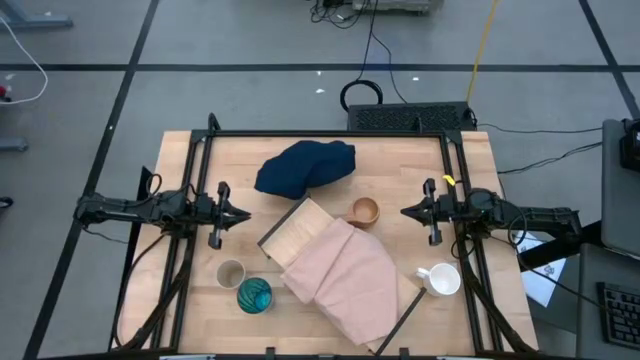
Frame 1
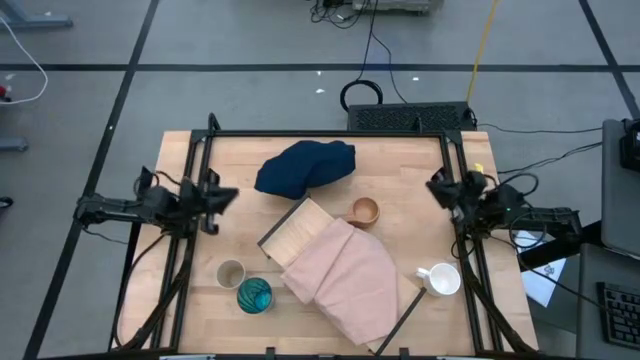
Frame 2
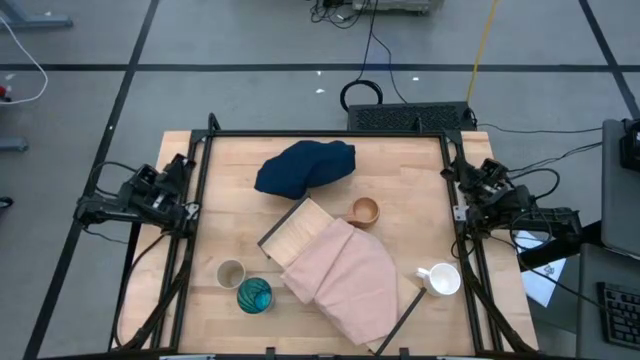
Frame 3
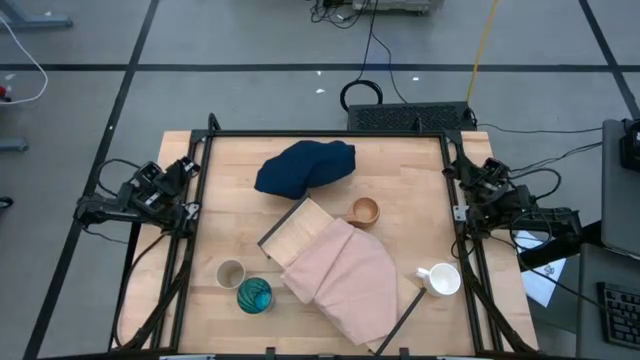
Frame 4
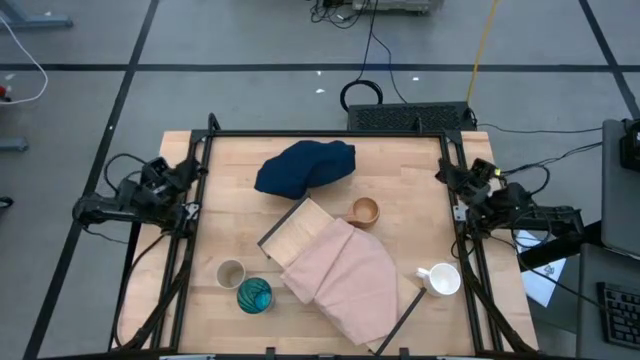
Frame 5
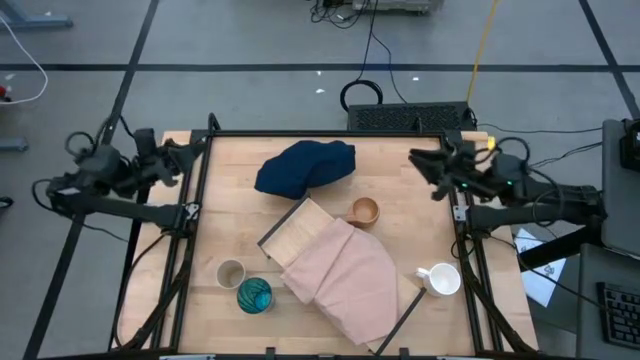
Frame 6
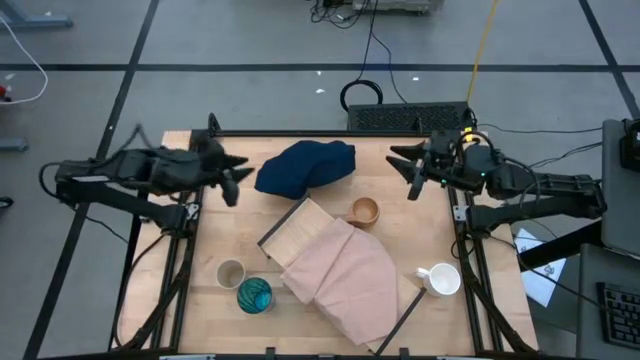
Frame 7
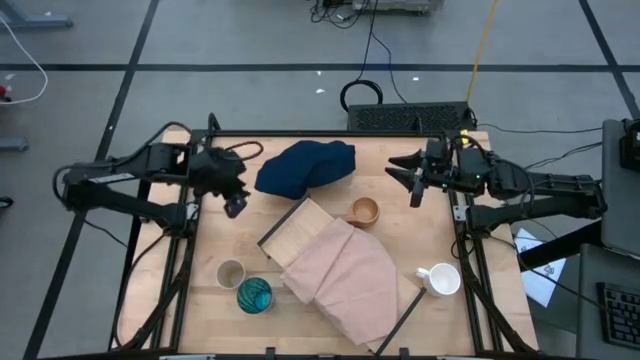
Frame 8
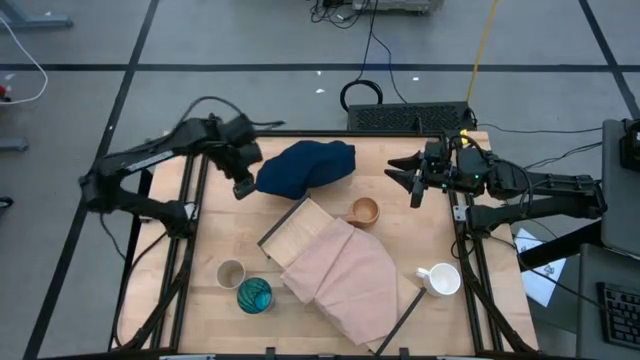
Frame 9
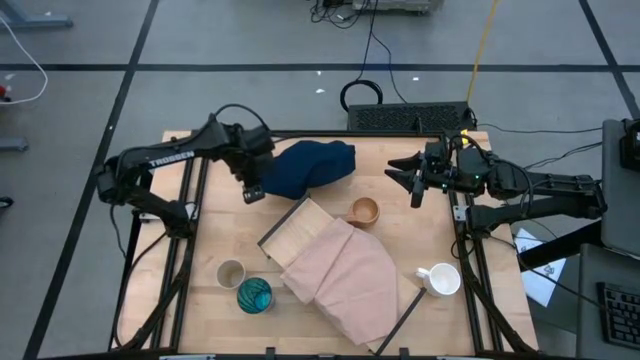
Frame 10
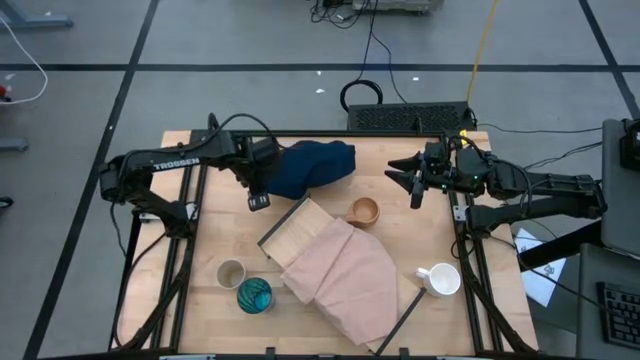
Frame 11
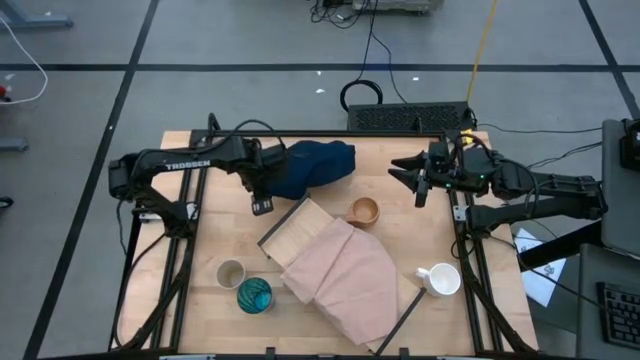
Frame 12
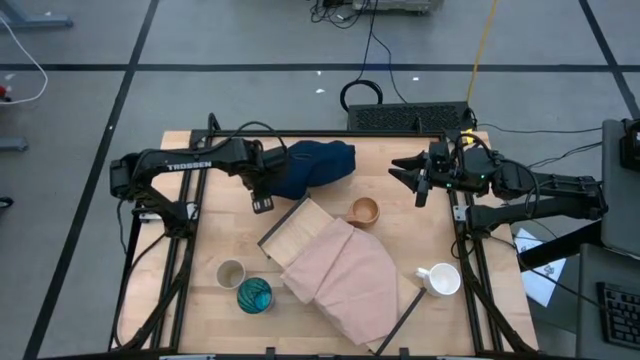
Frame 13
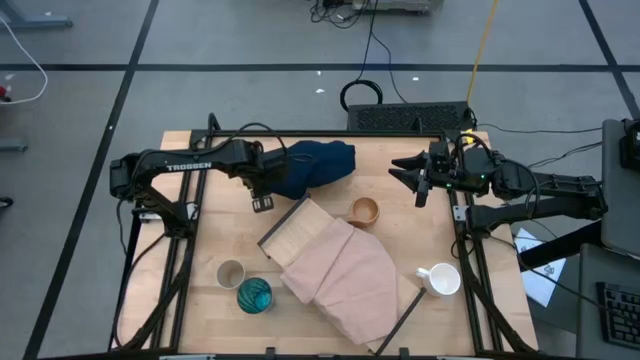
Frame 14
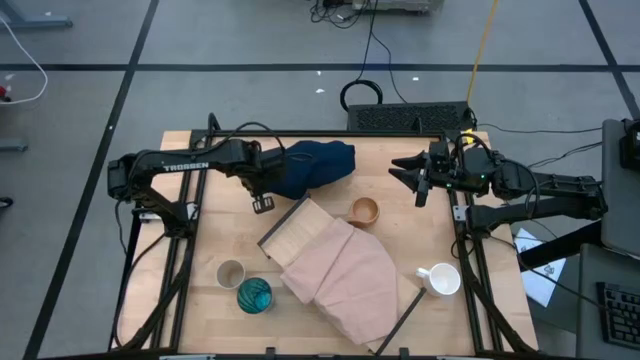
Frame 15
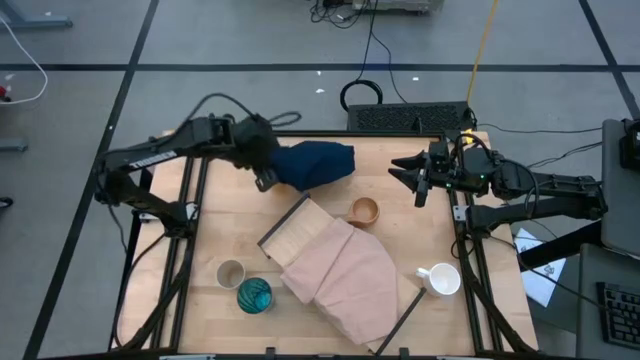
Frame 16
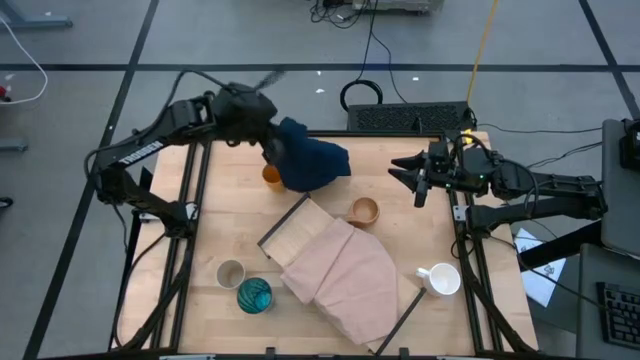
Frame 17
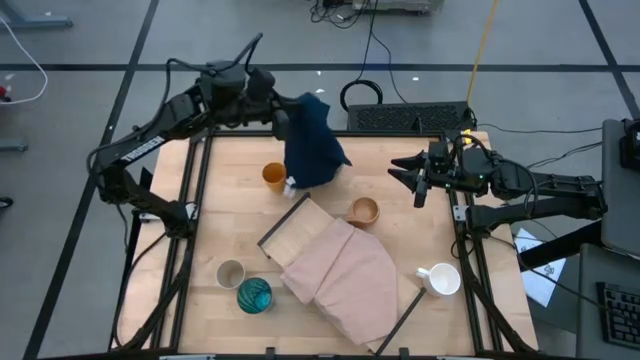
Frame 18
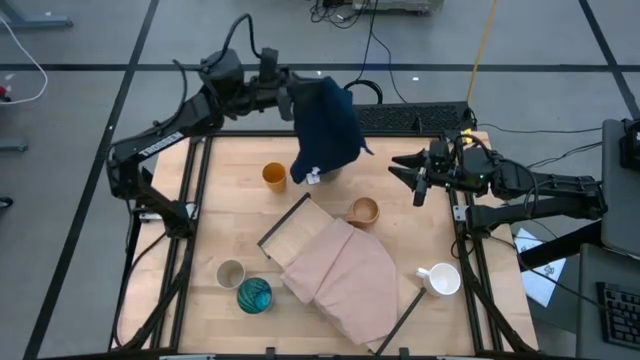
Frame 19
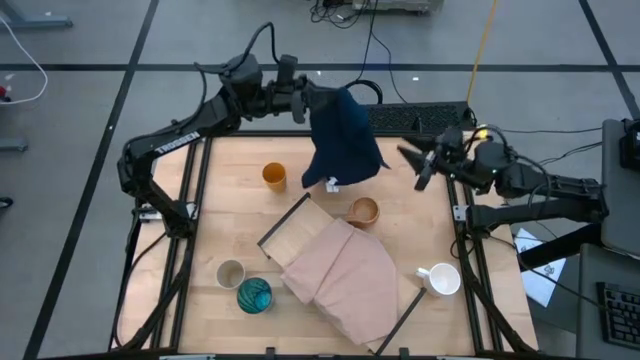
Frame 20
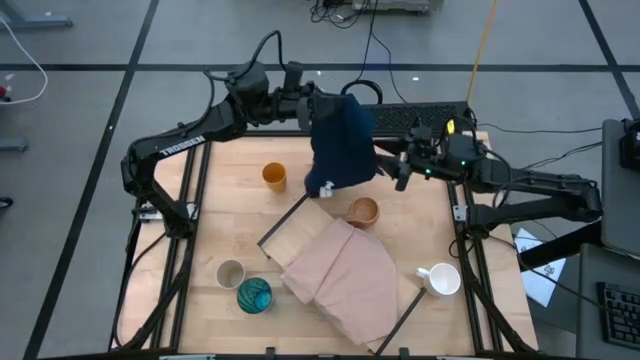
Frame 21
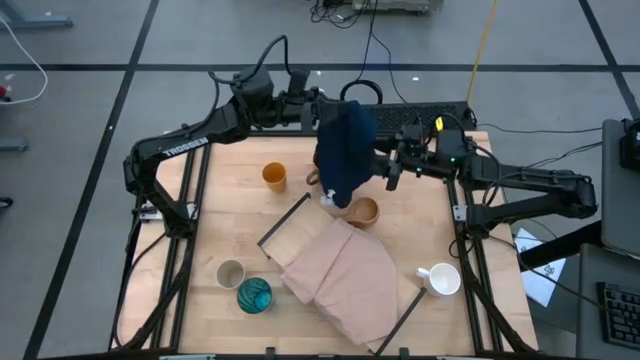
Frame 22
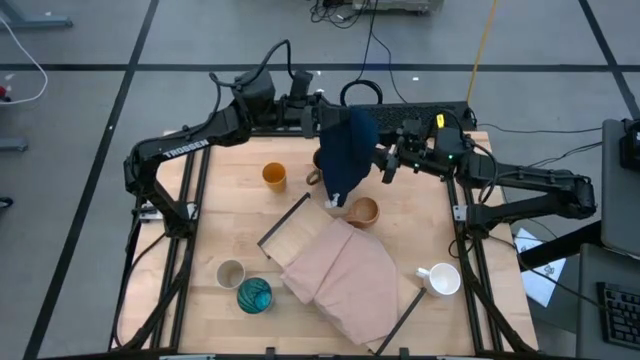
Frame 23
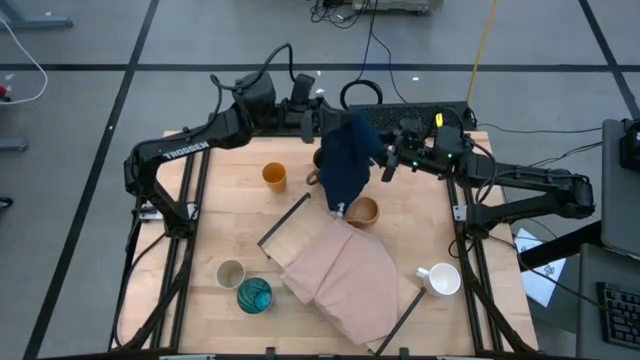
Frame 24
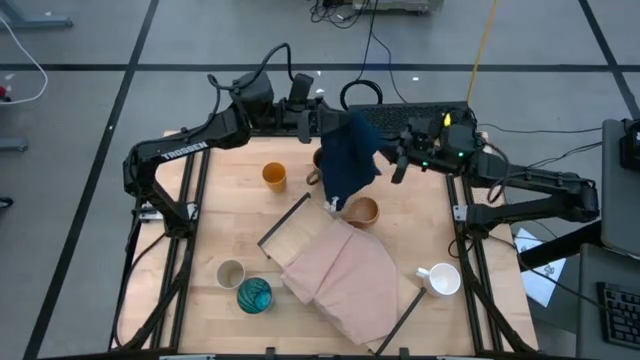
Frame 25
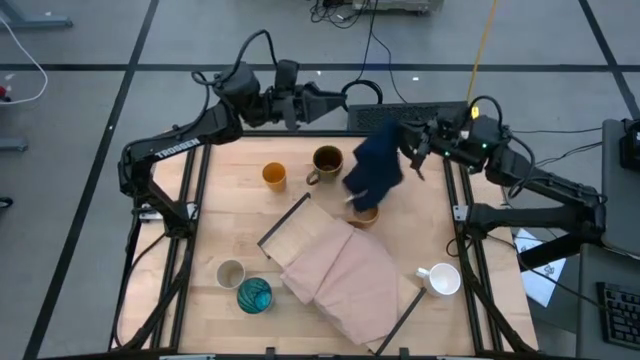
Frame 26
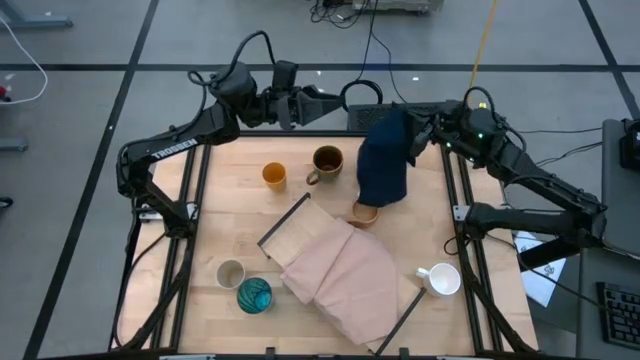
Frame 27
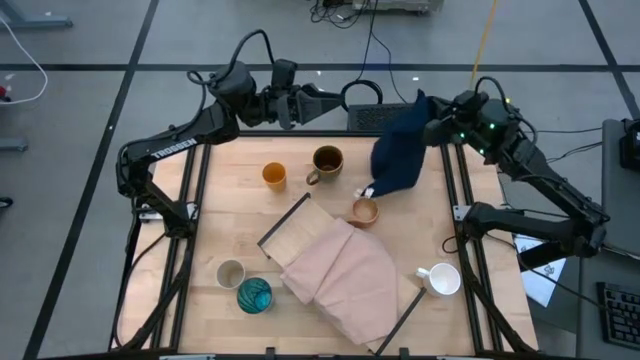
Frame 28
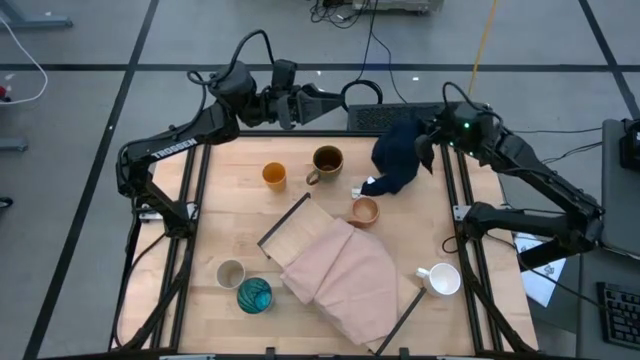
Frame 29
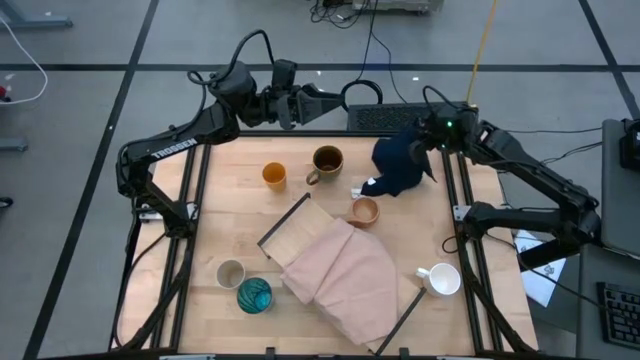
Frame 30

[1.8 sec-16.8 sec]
Task: Stack small to large cups/mugs on shelf
Move the blue napkin to the top right of the table

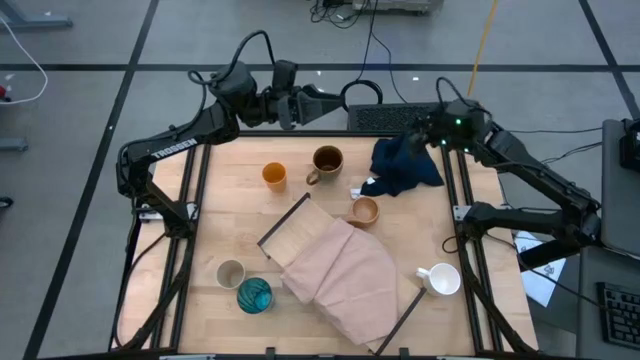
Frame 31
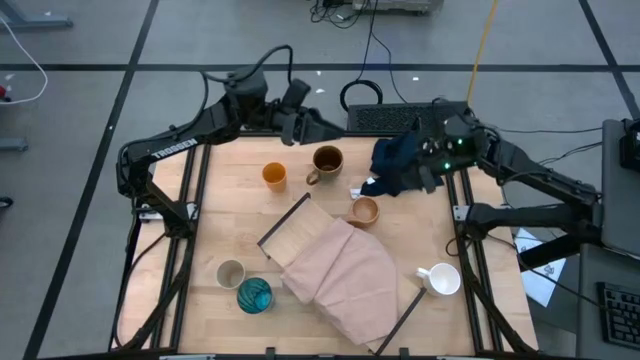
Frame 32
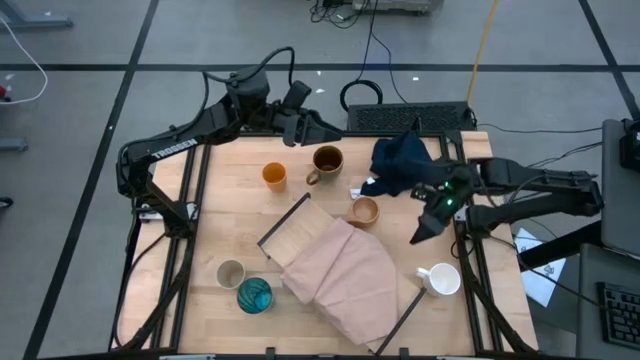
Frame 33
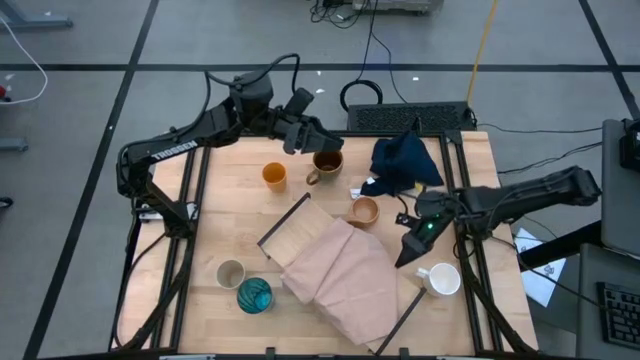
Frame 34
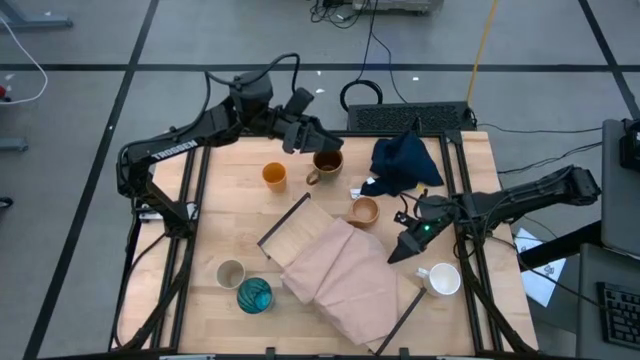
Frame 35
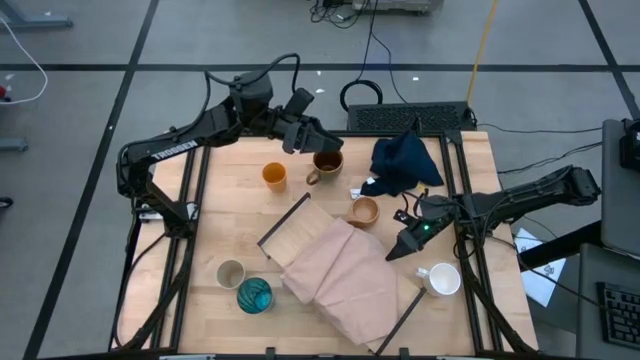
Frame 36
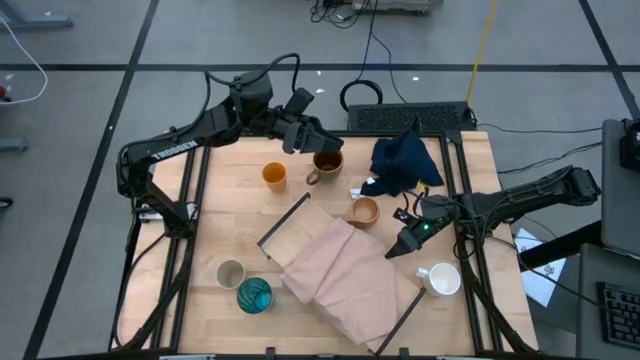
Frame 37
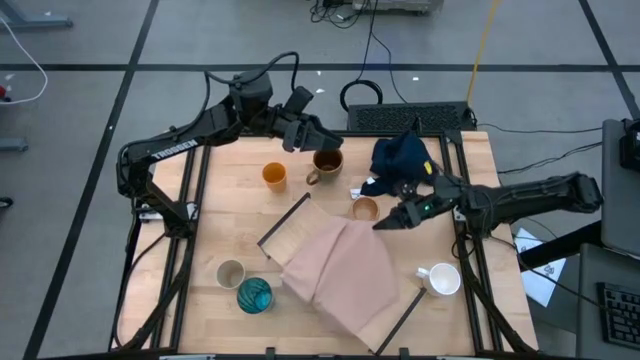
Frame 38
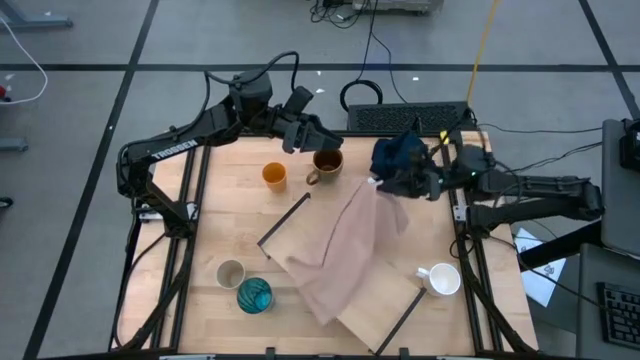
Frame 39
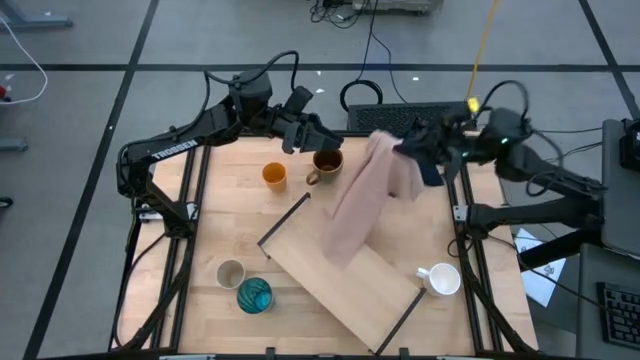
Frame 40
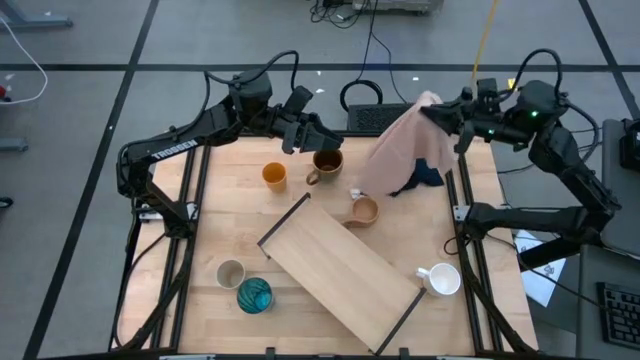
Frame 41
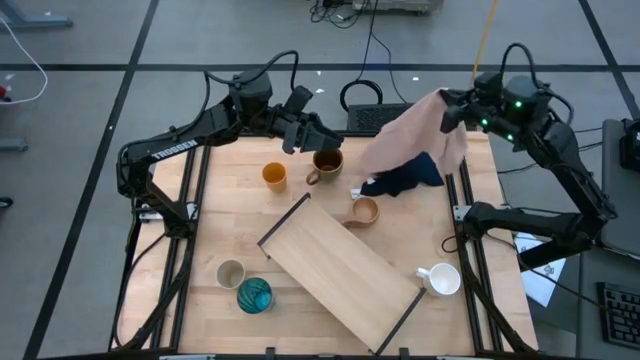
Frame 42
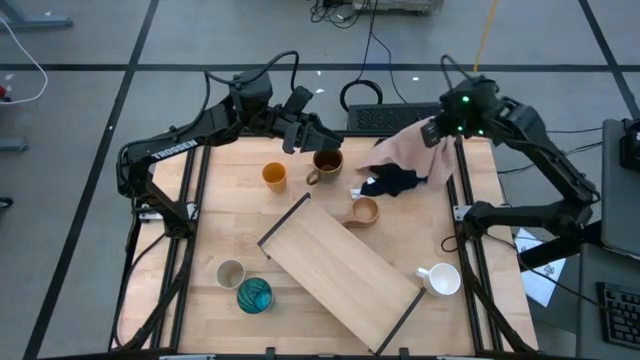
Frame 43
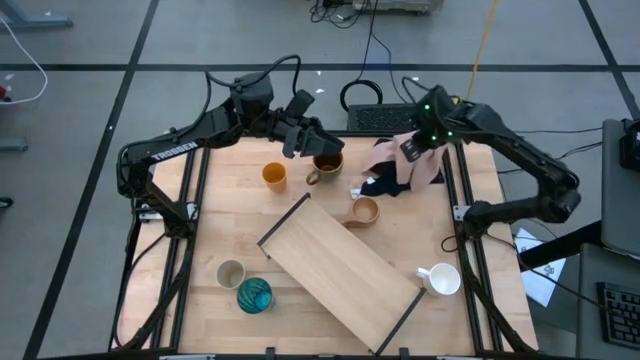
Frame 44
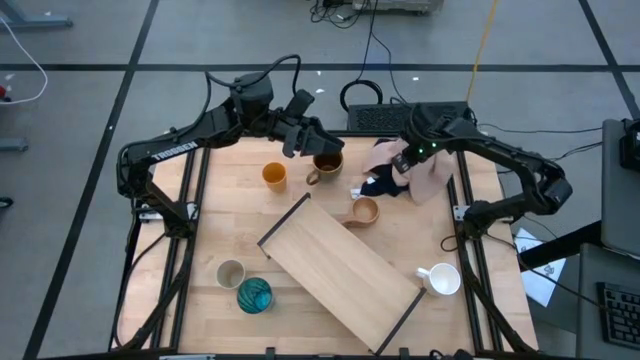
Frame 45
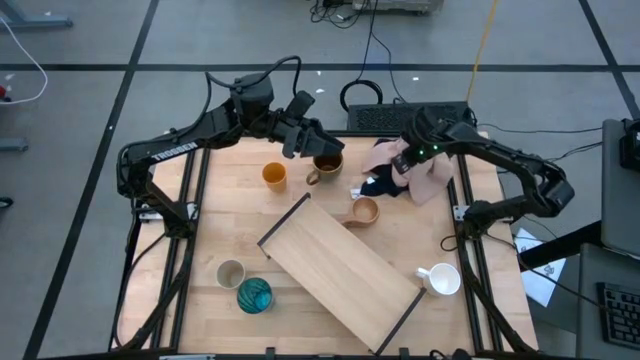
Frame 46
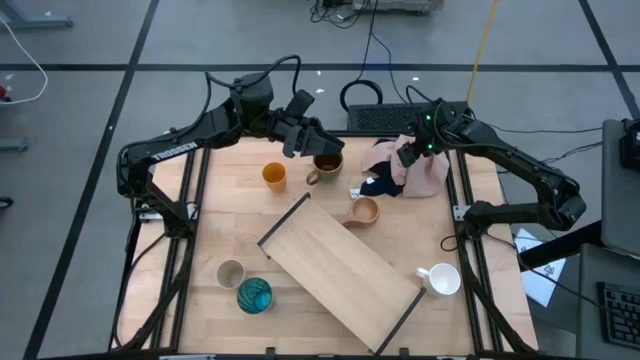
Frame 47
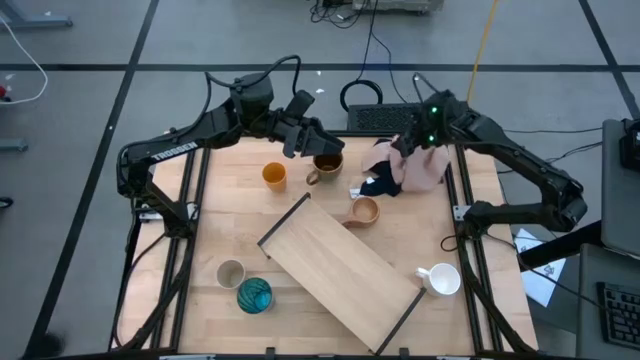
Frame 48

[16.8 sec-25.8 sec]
Remove the brown napkin from the shelf
